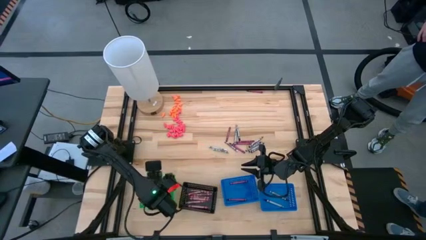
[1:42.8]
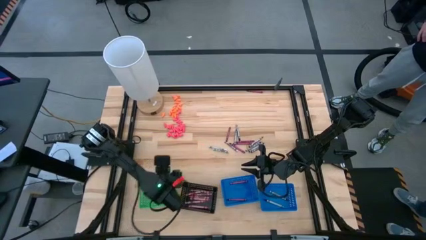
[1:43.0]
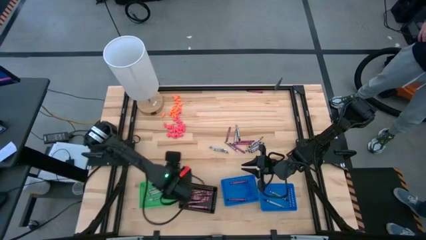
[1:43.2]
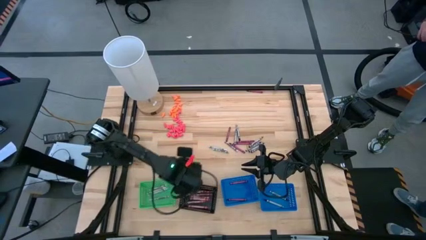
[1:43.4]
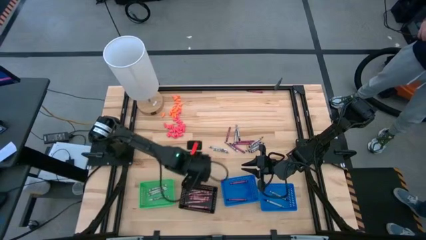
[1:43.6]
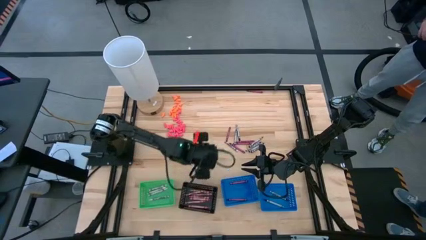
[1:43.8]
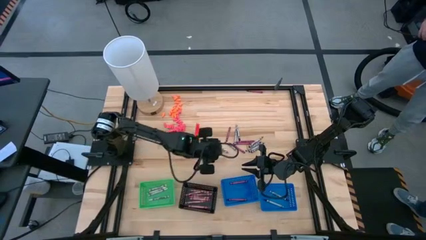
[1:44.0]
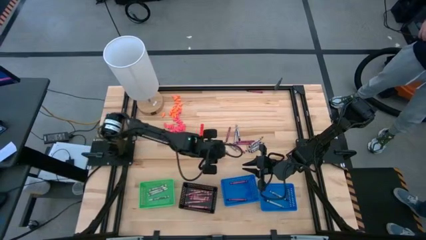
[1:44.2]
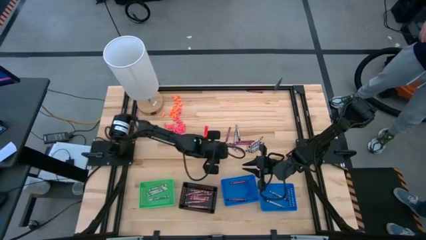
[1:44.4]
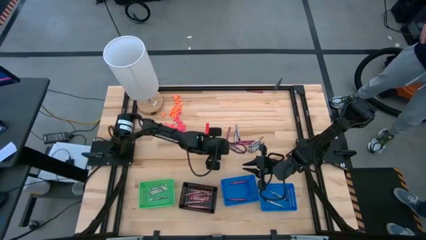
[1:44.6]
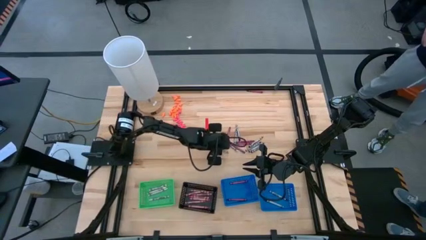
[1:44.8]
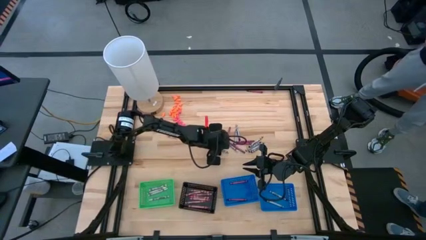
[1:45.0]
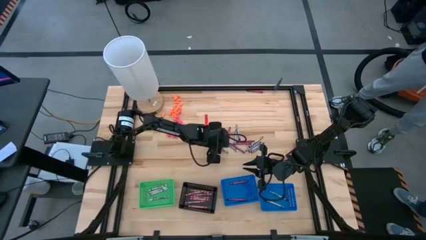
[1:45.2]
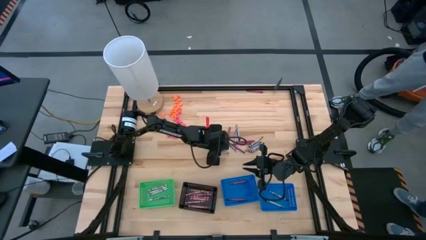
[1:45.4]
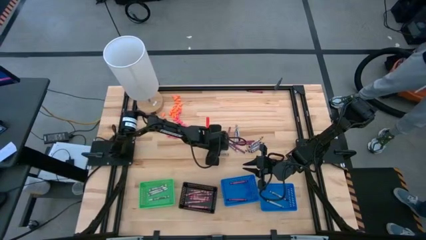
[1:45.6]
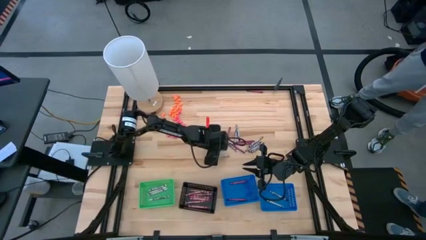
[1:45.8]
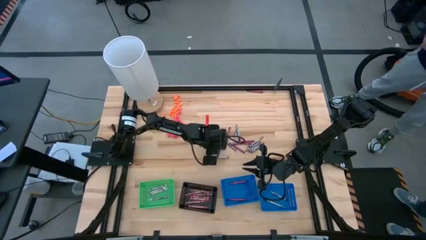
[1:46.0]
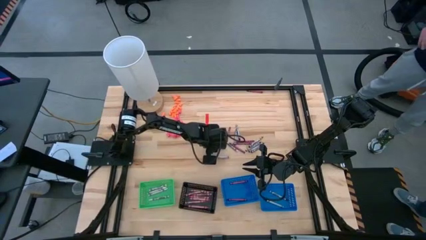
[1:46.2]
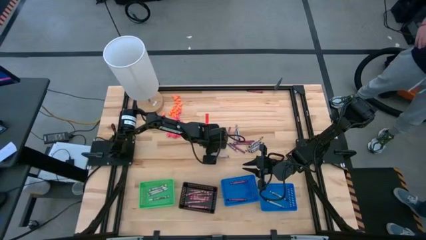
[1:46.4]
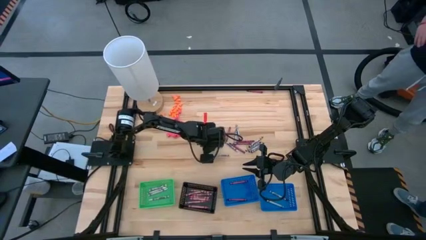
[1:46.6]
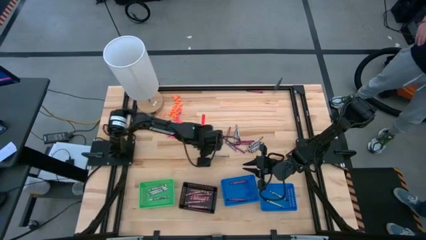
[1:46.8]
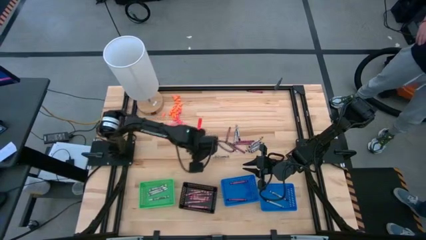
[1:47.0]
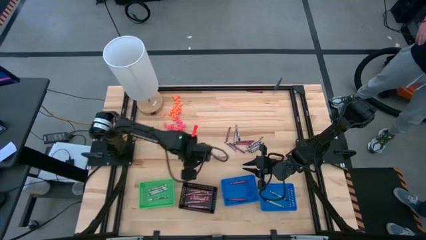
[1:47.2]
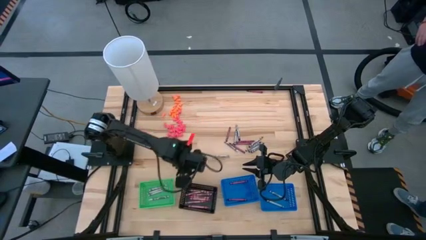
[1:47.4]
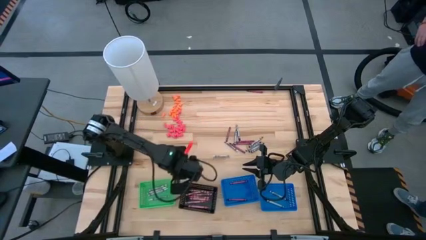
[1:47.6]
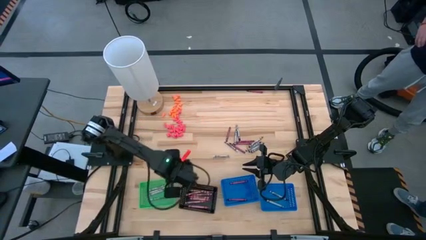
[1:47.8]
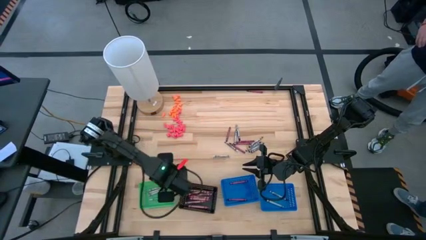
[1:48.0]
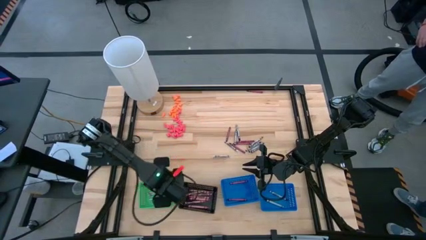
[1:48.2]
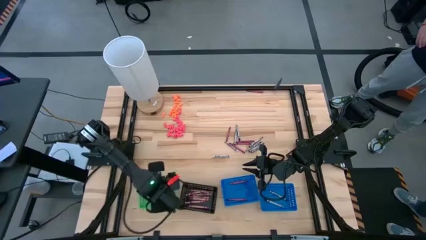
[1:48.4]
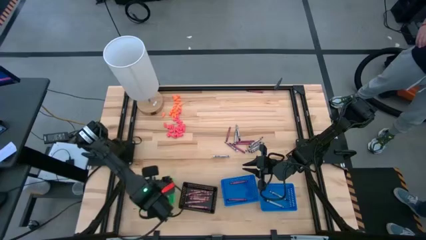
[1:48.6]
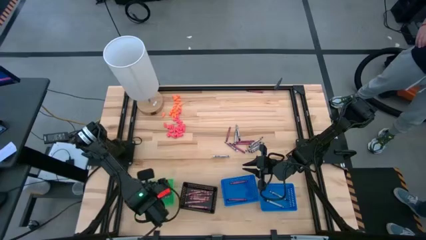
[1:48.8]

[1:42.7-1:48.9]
Task: Sort crayons
Put the white crayon into the green bin

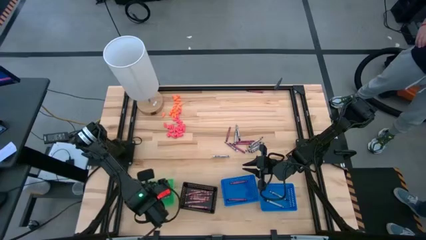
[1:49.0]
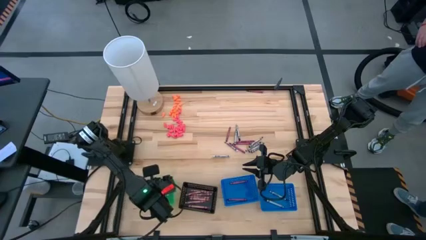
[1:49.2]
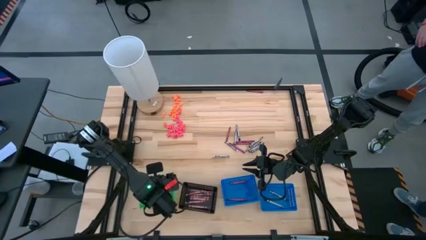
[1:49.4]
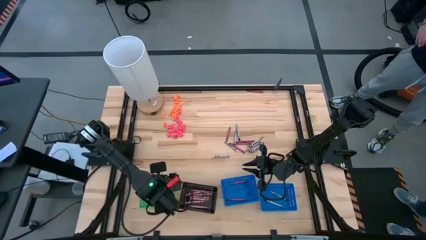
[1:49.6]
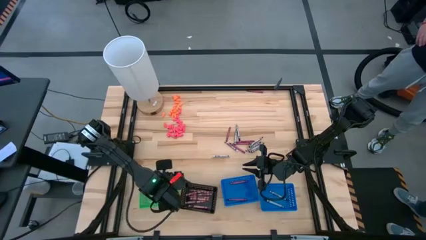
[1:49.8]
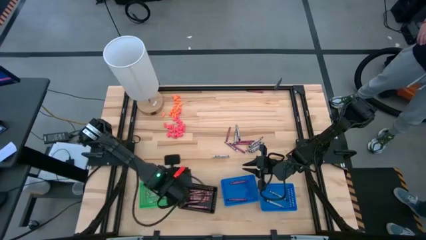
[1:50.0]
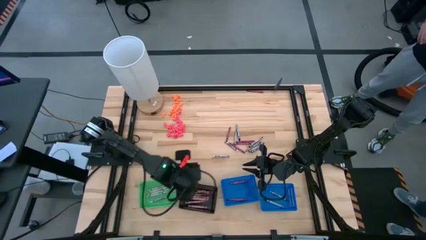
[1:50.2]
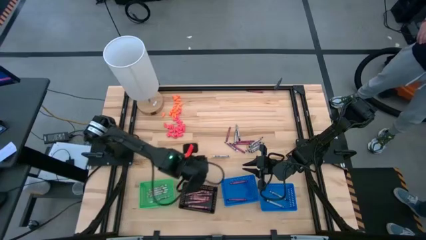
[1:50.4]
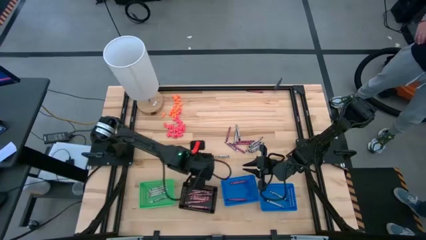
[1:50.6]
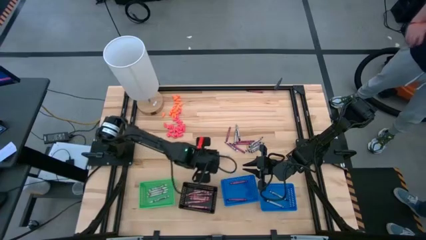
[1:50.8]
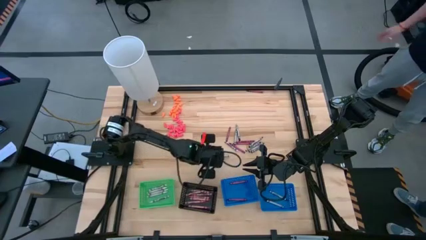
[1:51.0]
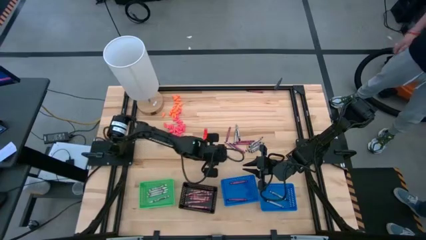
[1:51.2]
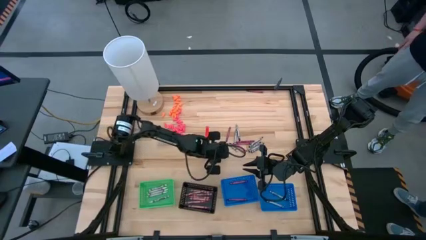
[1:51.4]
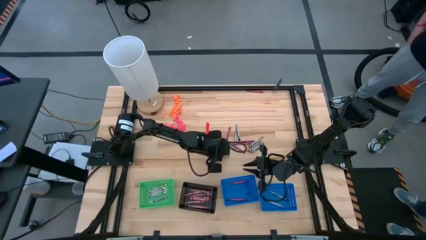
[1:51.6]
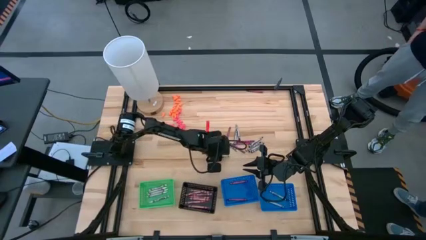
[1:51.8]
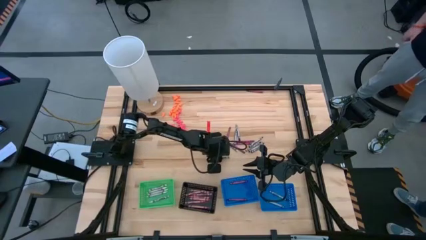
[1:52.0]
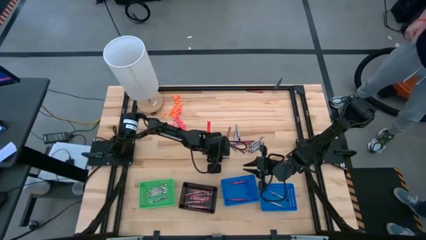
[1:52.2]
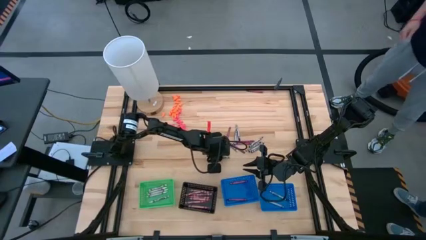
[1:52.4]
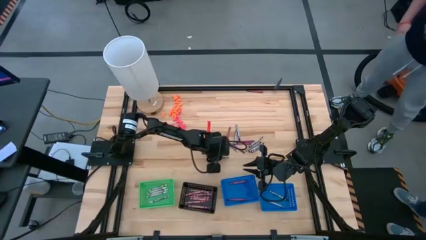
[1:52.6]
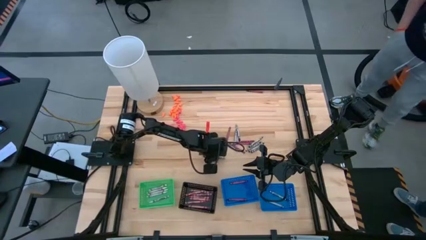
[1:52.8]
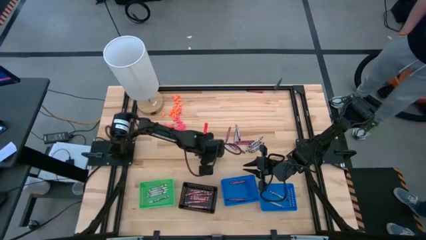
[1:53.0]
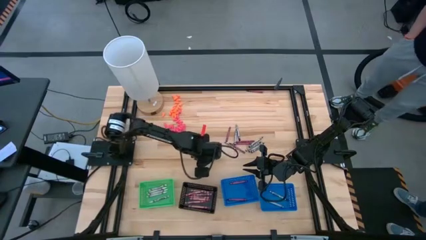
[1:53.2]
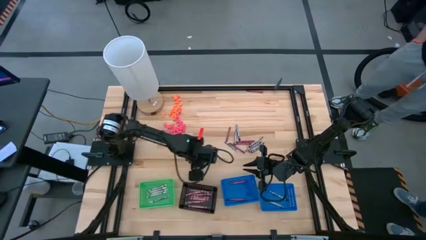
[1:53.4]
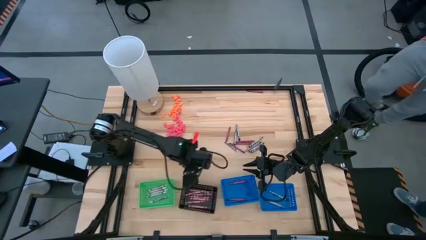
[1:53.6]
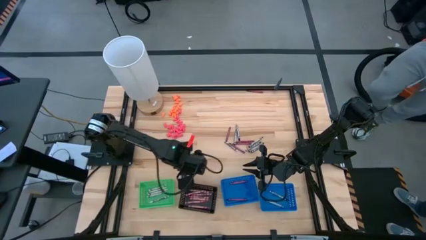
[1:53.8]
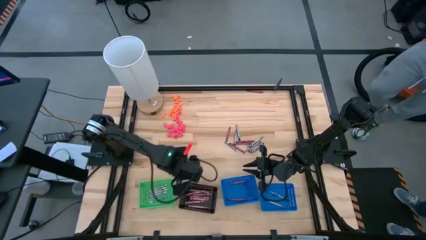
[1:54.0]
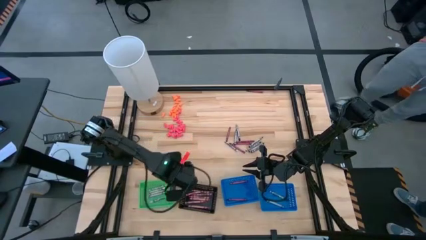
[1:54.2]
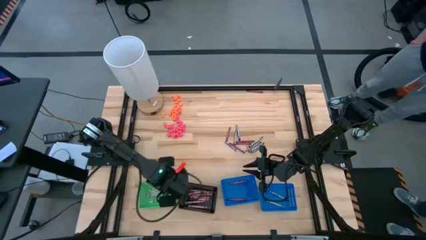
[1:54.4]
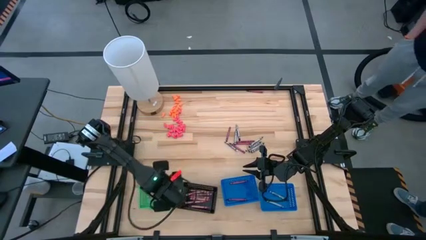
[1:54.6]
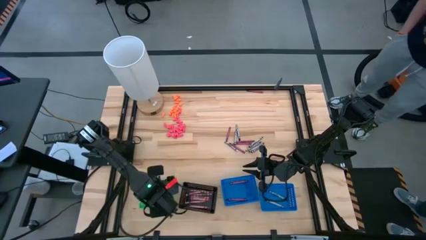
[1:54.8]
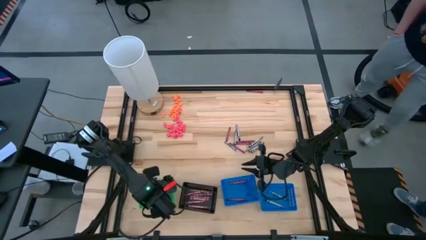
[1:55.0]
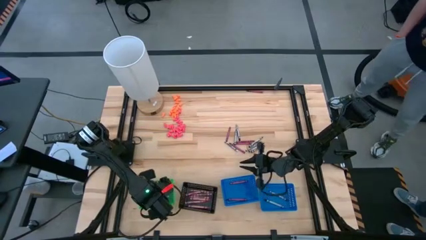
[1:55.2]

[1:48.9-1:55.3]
Put the white crayon into the green bin

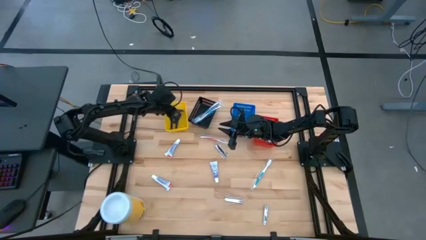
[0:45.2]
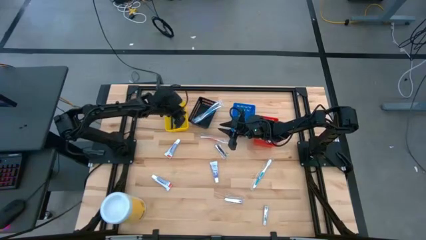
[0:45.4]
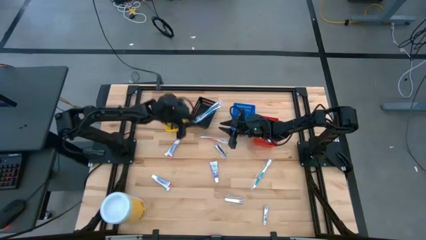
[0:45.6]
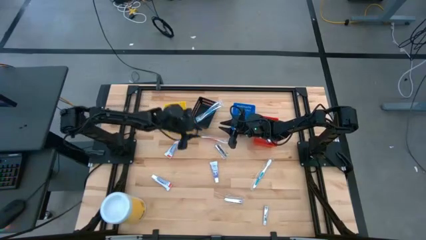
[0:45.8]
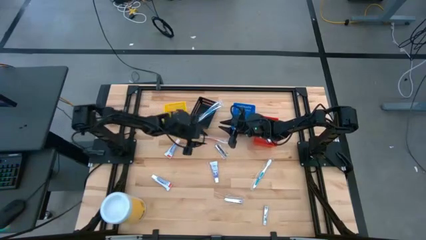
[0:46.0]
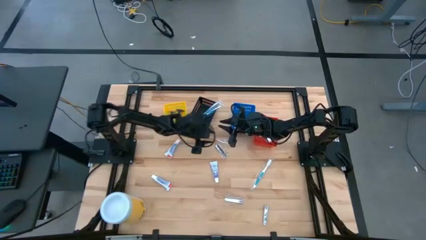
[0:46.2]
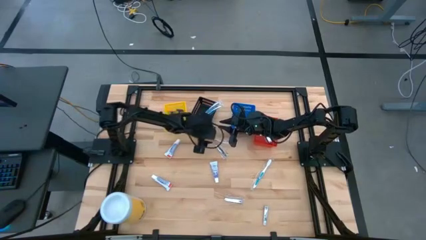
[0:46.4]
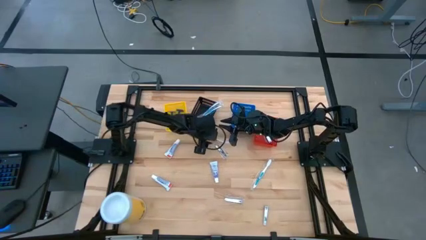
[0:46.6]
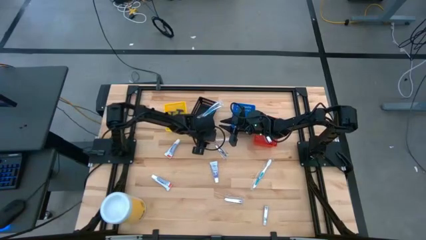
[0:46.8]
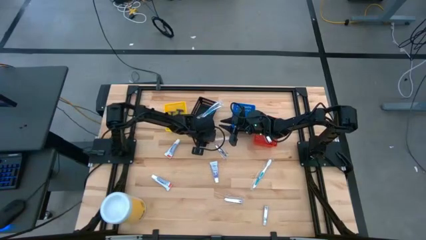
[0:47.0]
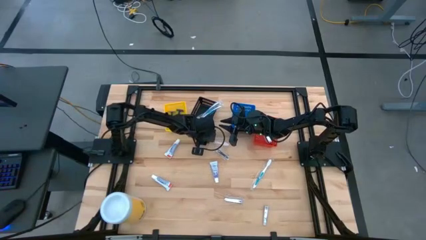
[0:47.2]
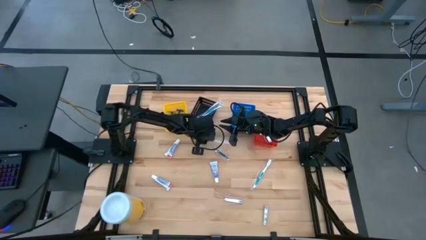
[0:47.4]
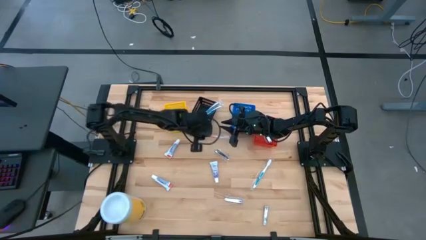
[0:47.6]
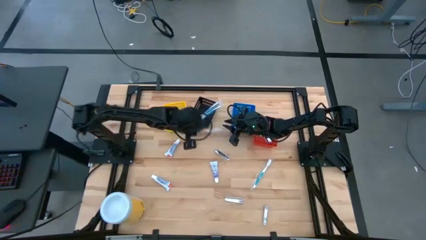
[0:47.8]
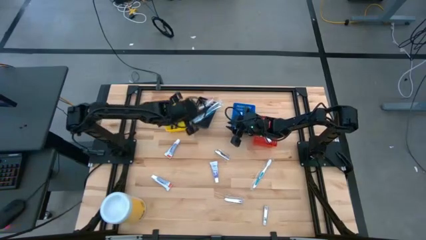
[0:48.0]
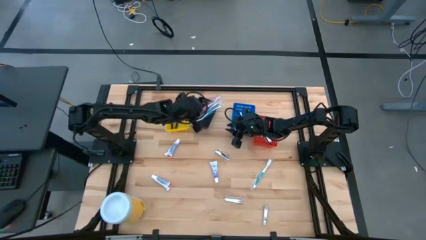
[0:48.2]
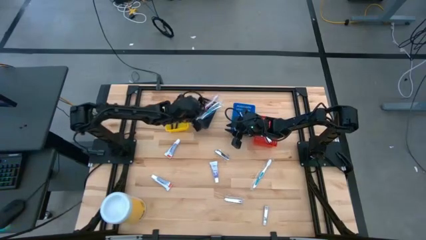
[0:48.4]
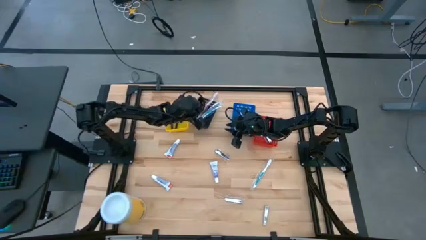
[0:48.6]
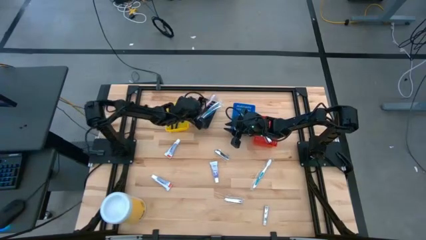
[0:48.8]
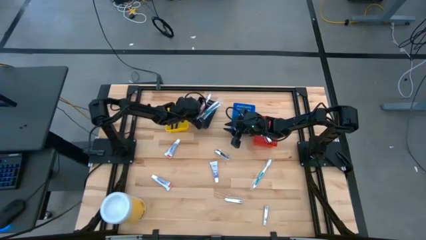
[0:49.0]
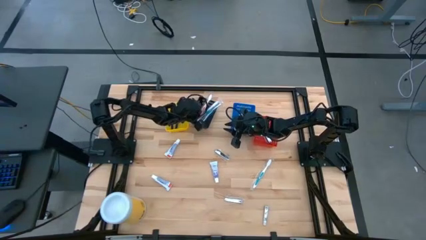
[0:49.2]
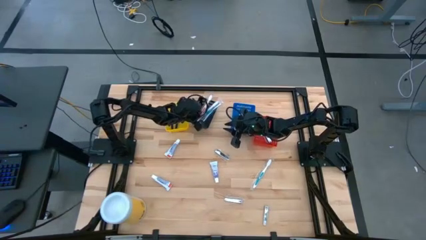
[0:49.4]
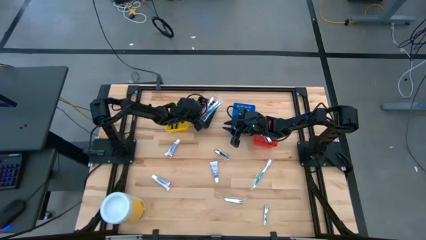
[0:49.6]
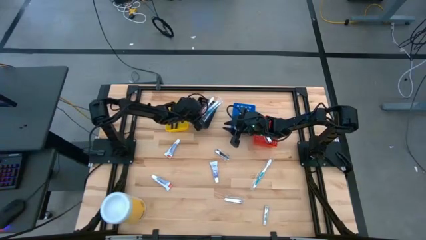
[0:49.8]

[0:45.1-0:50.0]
Task: Pick & Place Travel size toiletries
Put the red toothbrush into the black bin
